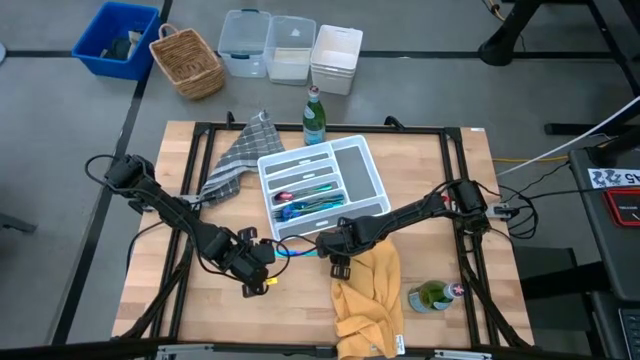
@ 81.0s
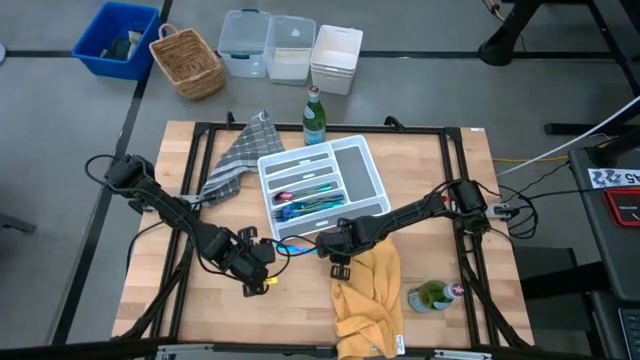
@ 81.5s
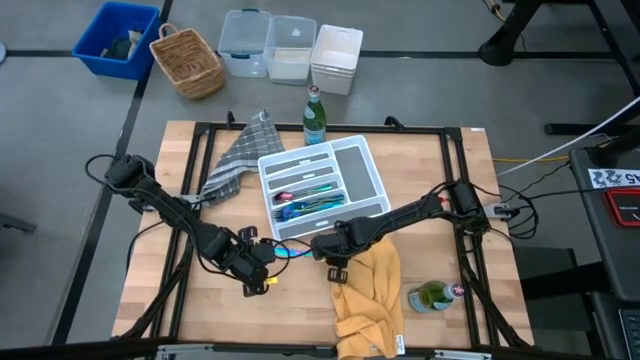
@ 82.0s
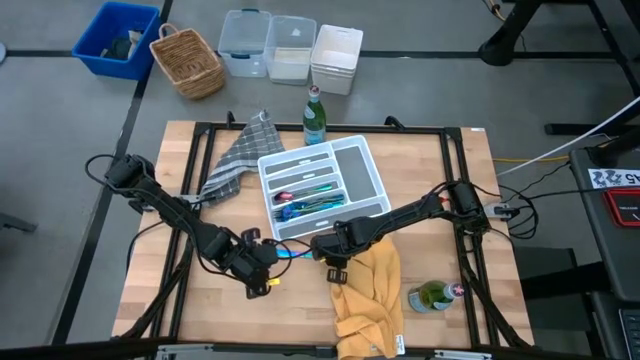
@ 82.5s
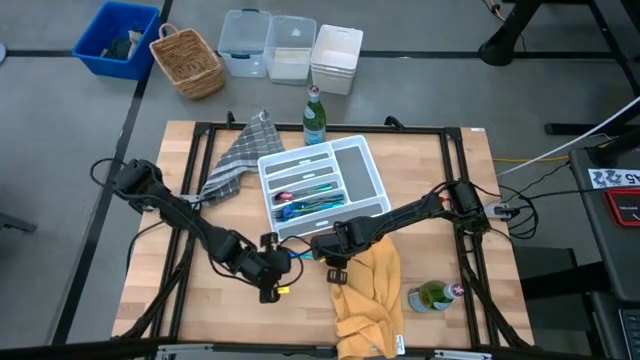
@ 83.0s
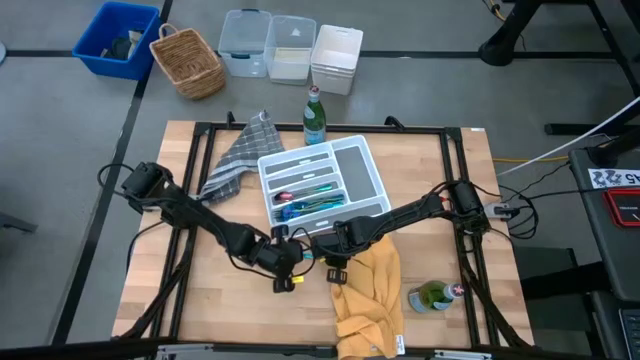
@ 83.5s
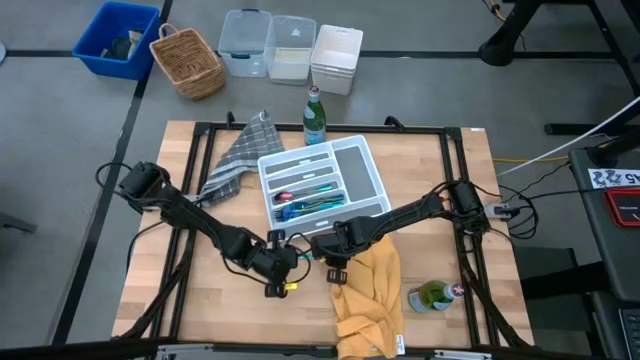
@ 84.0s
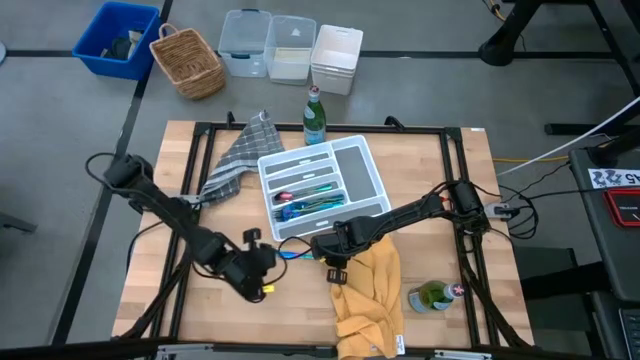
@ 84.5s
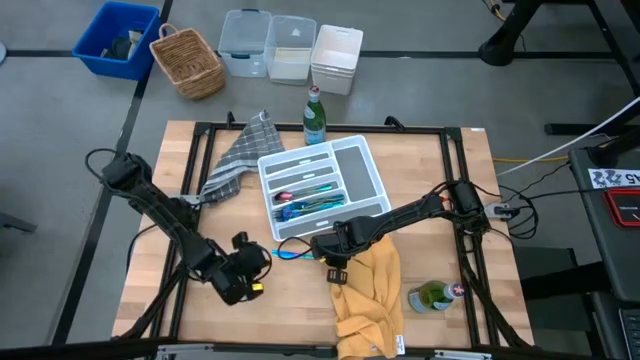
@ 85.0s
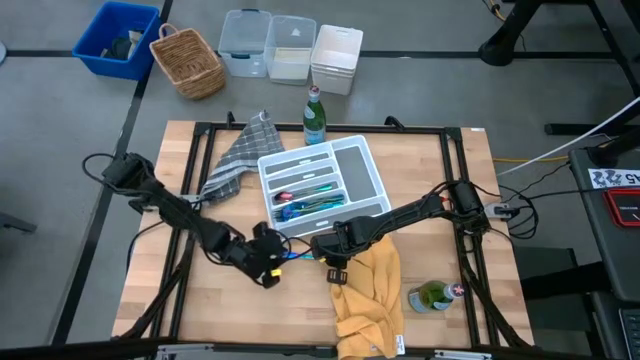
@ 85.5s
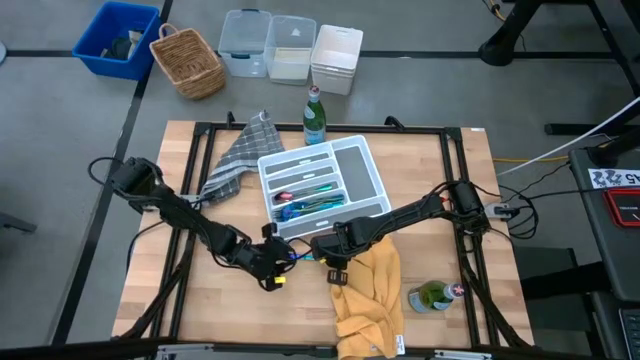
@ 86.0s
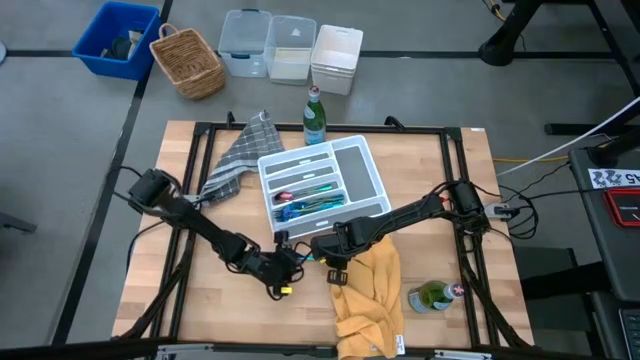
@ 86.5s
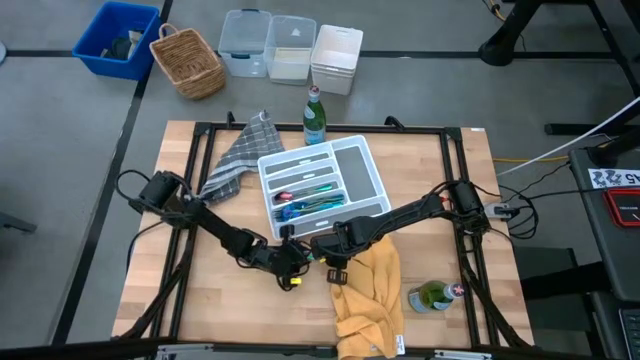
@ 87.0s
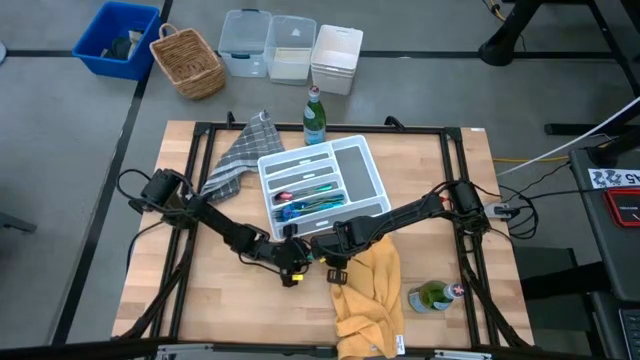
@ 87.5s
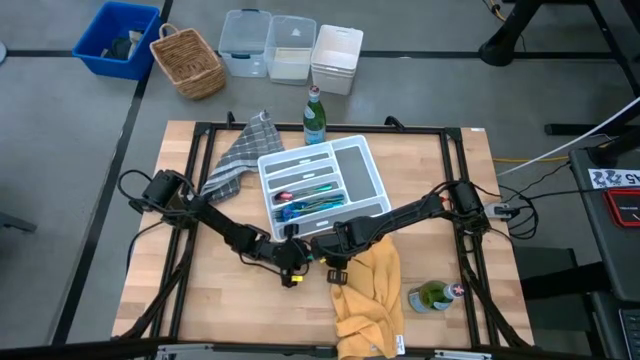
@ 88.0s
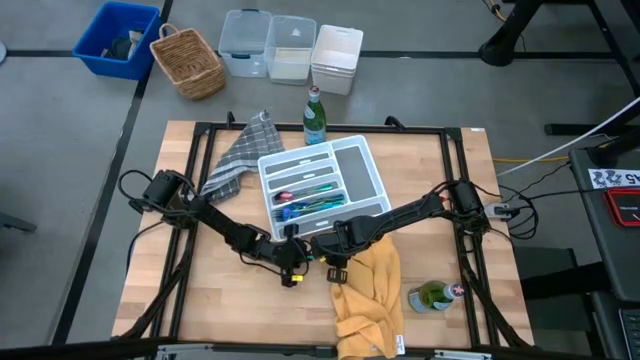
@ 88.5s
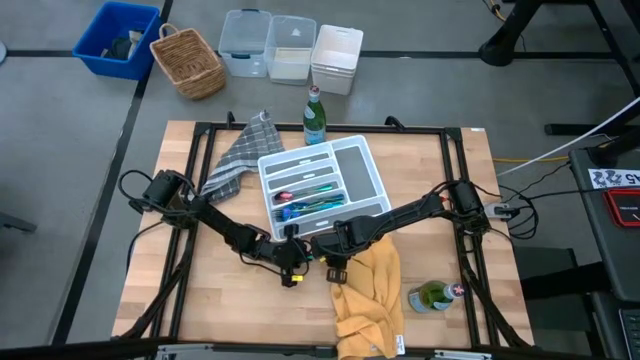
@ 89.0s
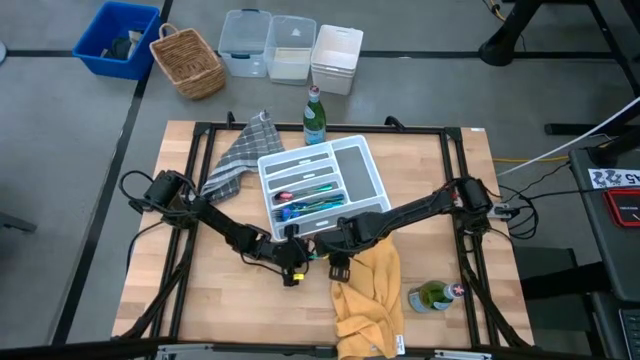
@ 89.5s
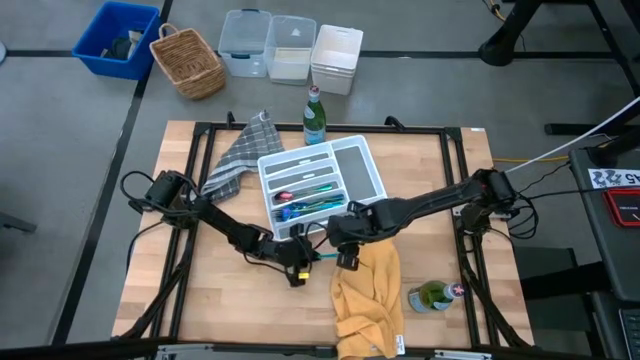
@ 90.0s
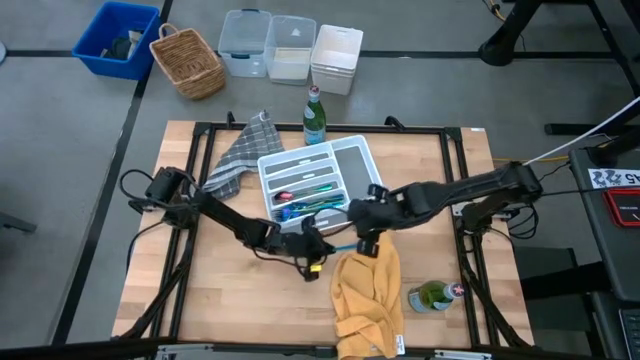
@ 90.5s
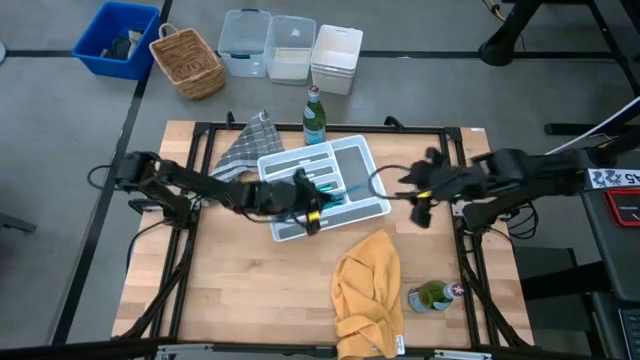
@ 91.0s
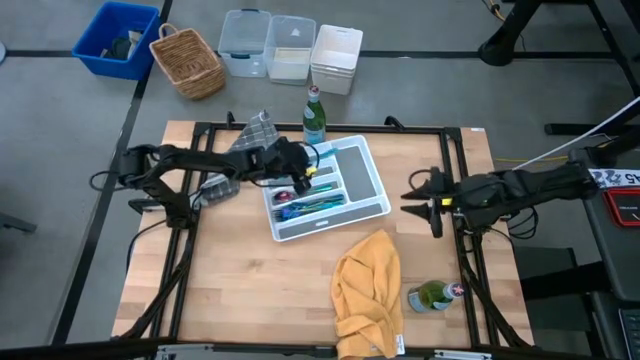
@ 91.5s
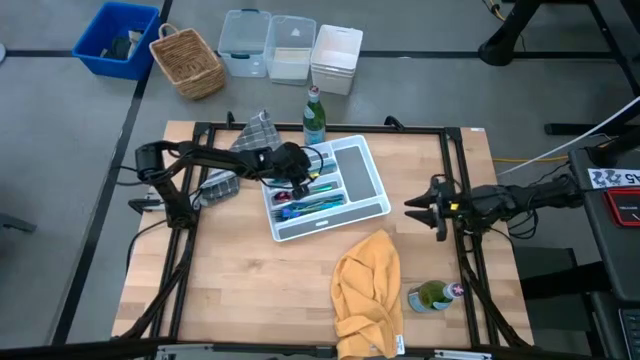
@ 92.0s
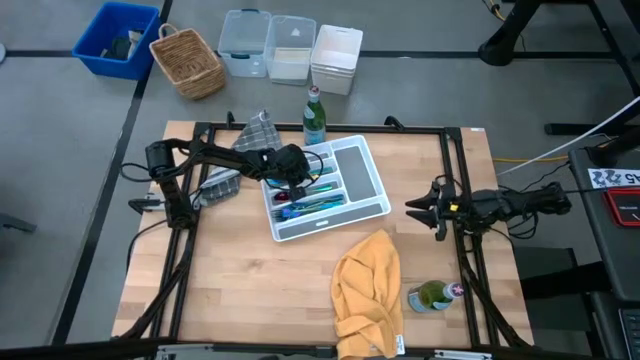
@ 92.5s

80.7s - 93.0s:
Task: Sort silverware
Put the table knife in the silverware tray

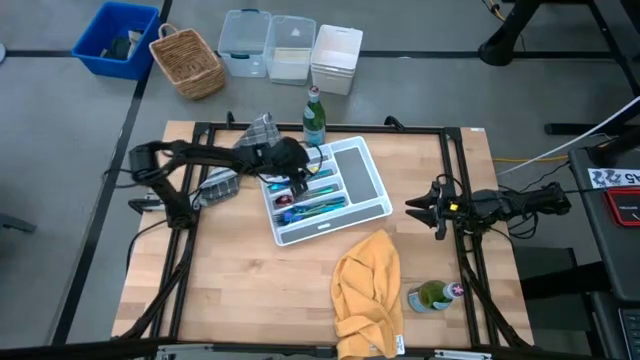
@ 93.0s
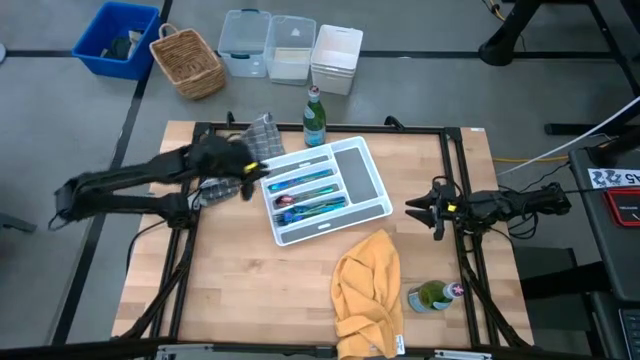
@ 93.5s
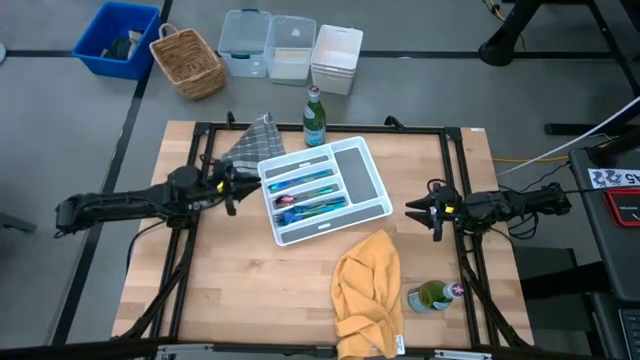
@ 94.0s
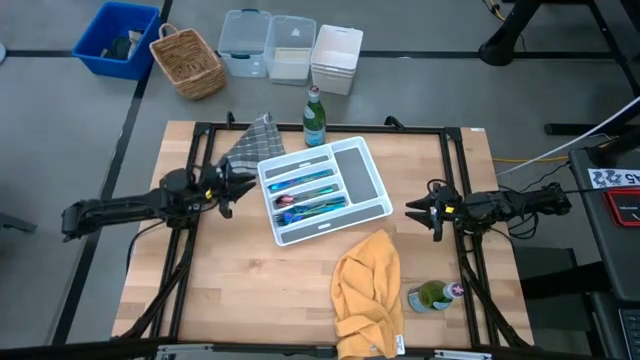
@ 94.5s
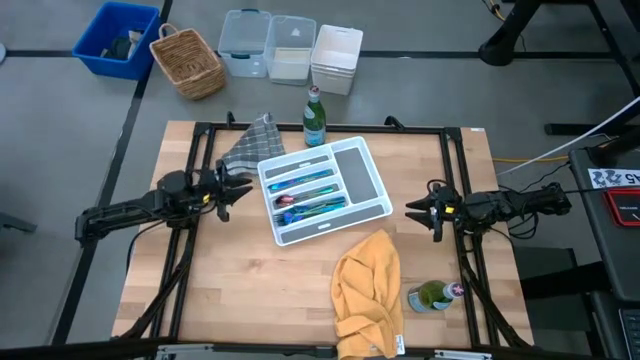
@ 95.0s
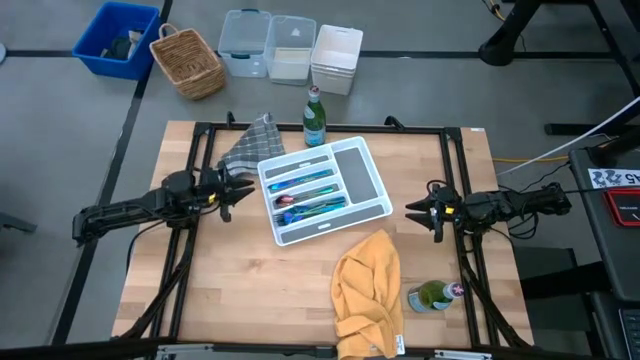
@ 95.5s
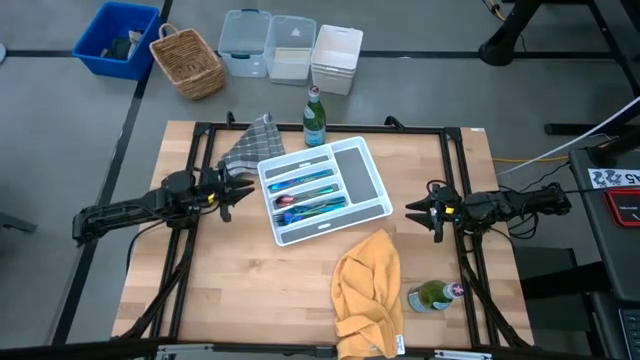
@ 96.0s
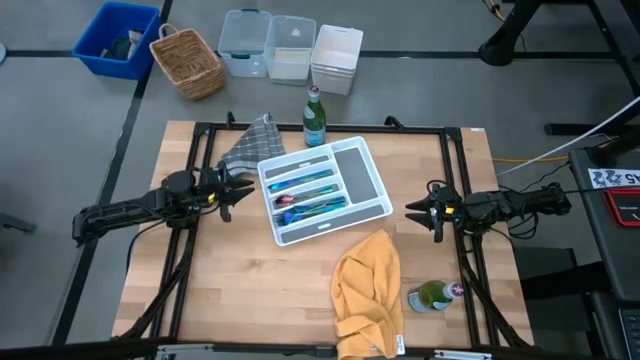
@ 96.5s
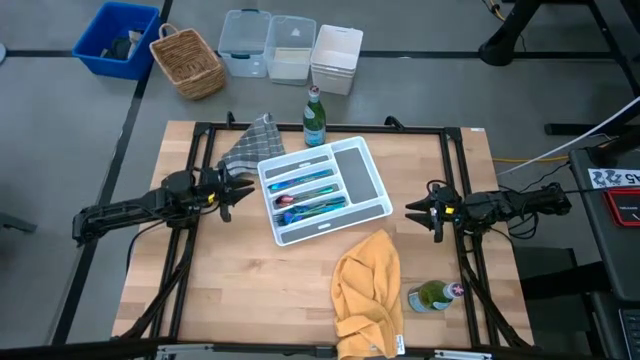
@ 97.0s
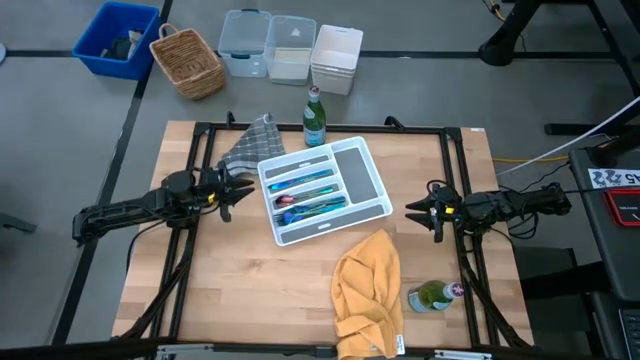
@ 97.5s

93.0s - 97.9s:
Return to Home Position

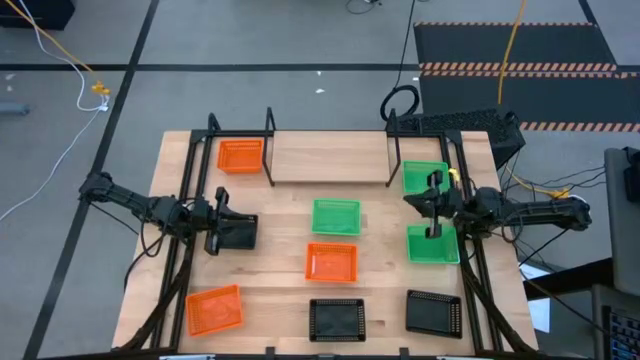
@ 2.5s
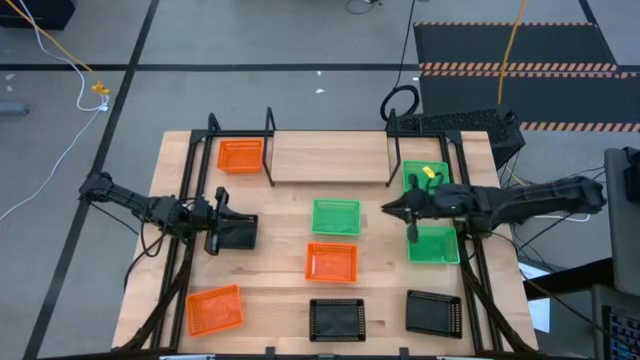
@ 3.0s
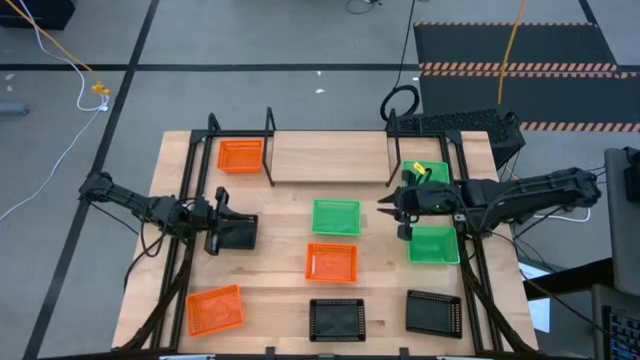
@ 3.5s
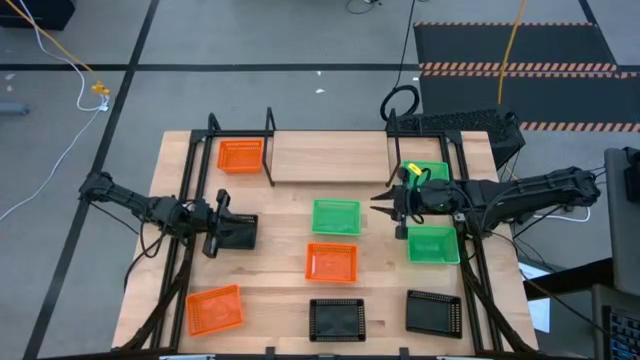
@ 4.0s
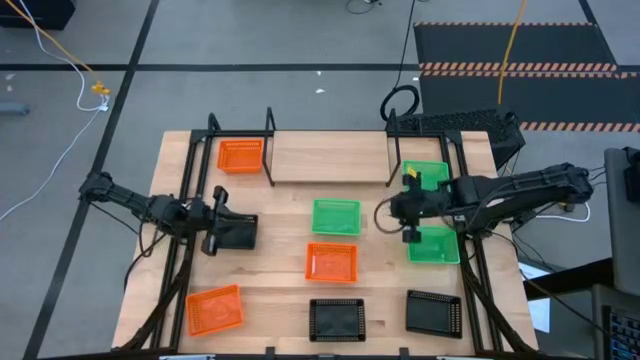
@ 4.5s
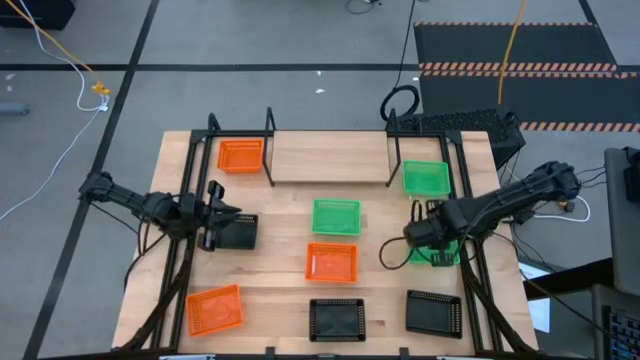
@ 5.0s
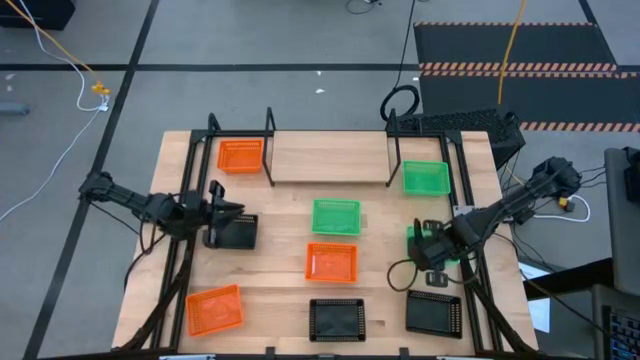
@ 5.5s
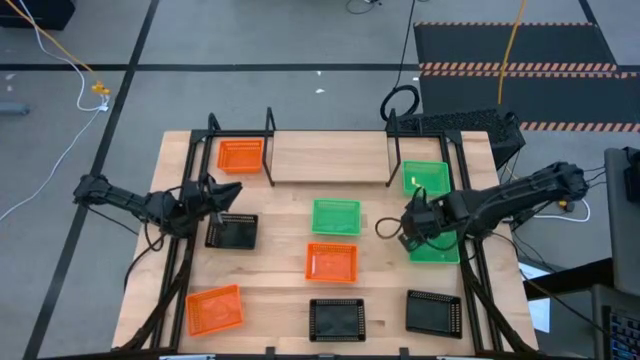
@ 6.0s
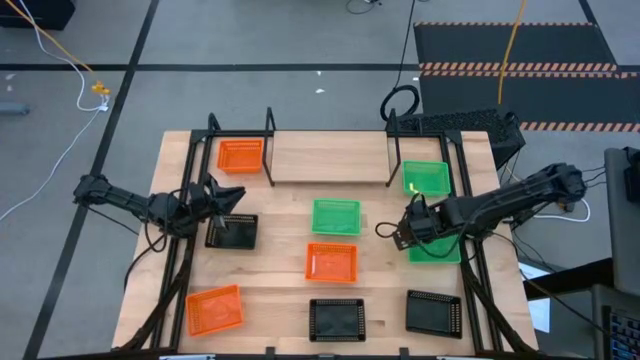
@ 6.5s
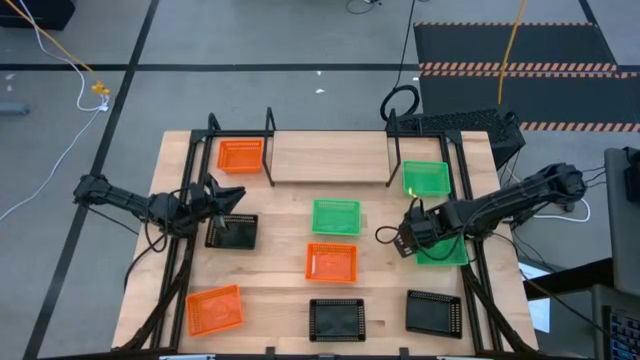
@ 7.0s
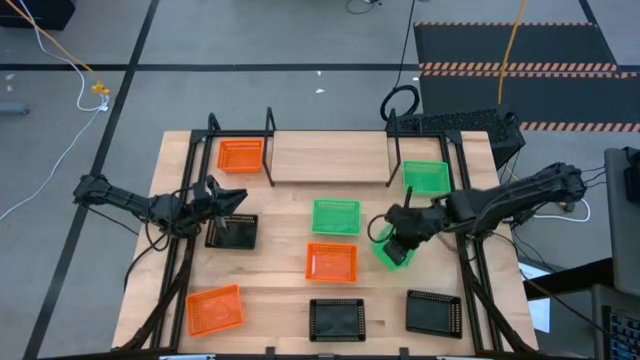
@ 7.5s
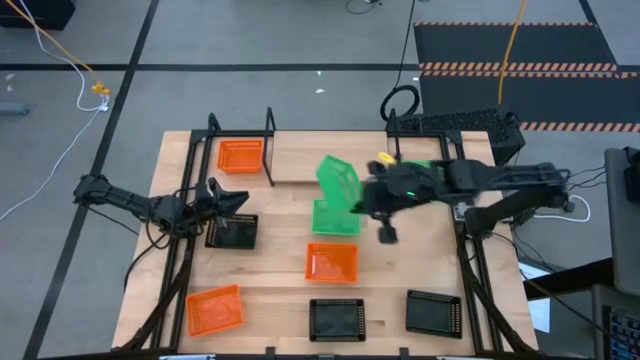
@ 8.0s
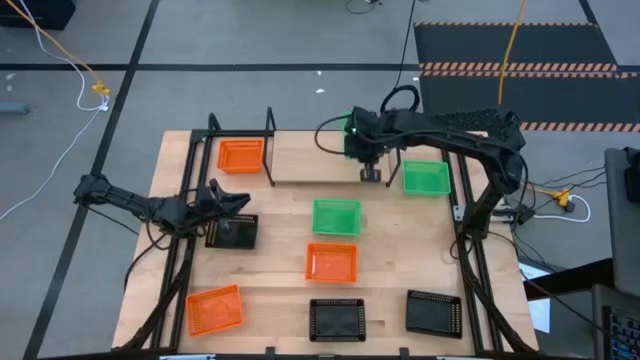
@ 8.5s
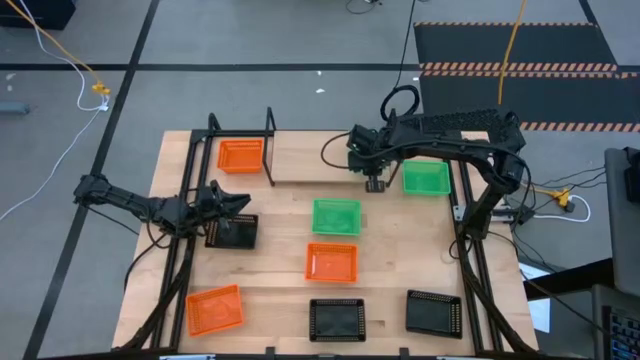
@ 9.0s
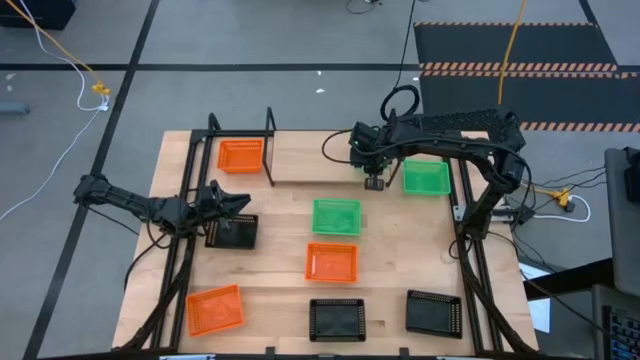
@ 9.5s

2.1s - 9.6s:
Task: Stack baskets on shelf by color
Put the bottom right green bin on the shelf
